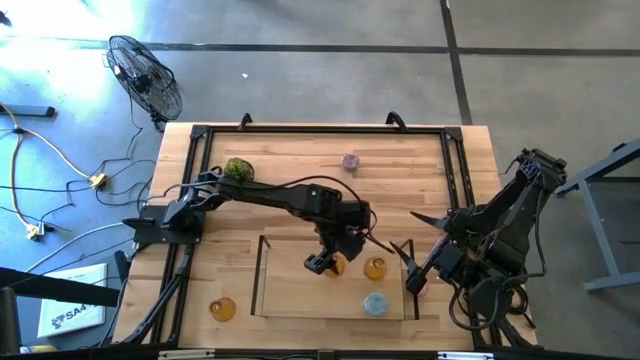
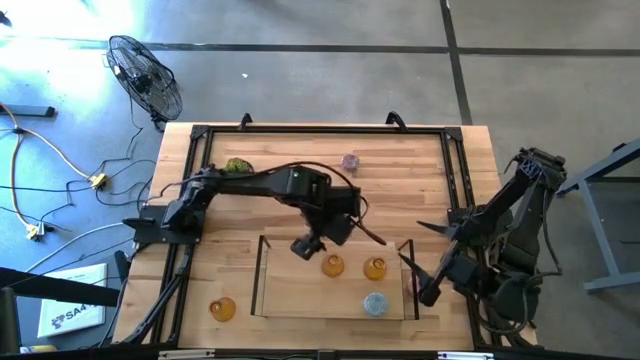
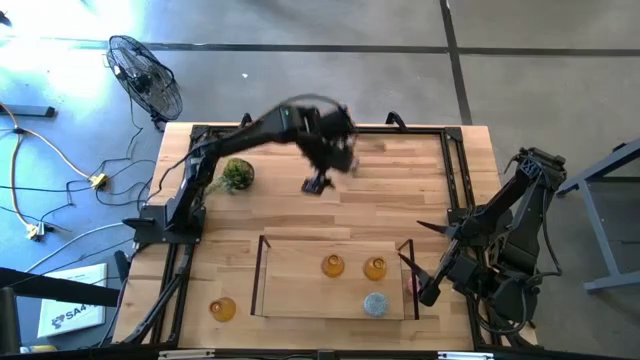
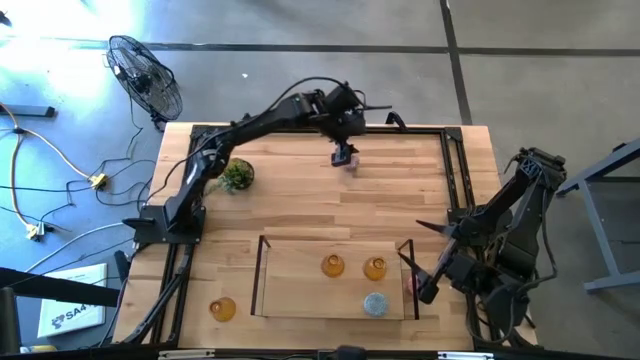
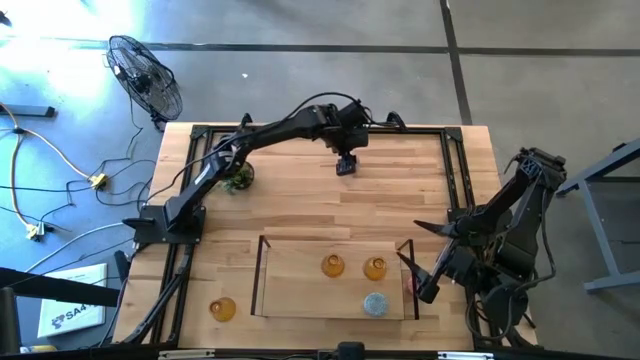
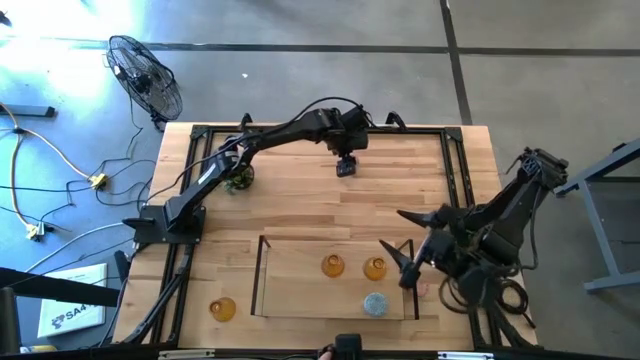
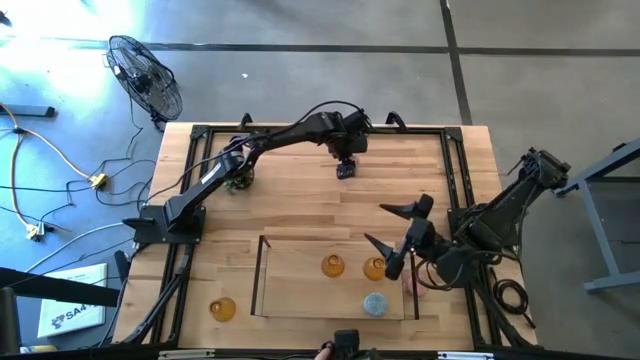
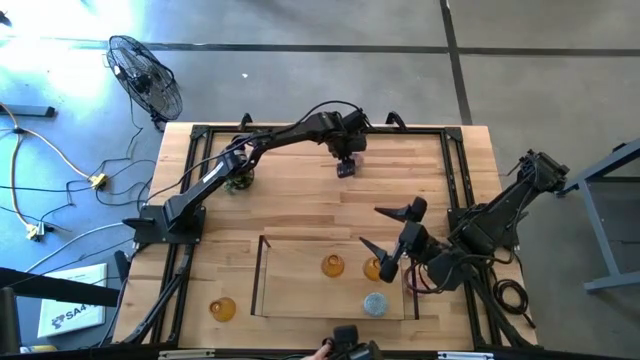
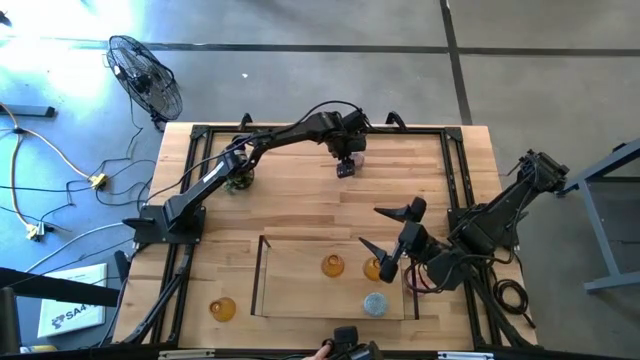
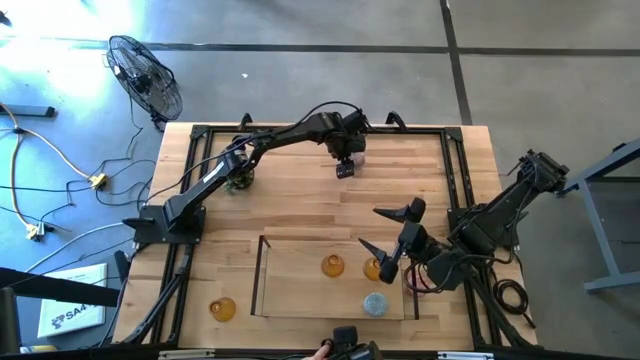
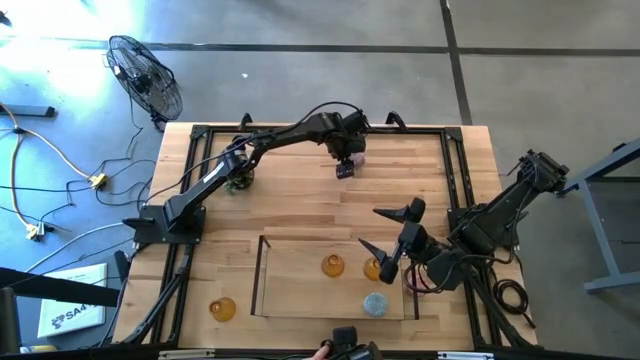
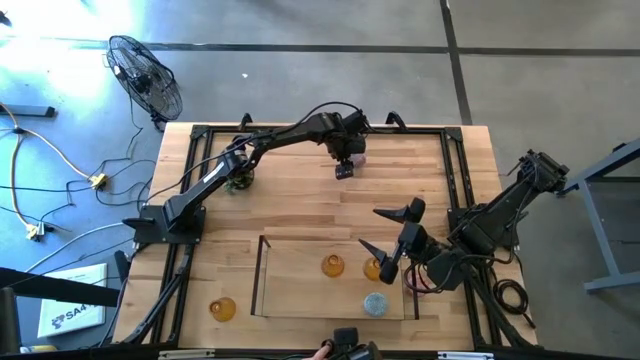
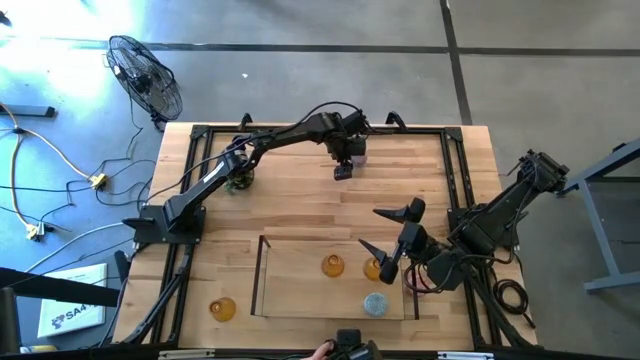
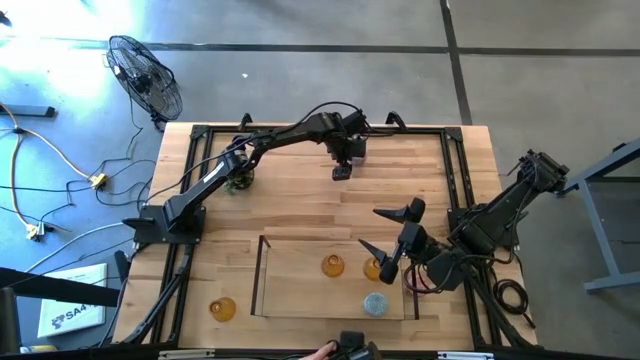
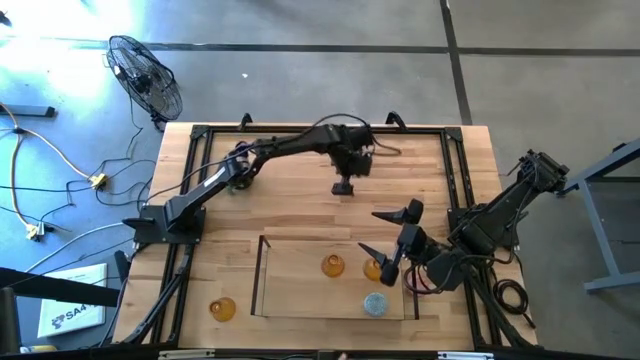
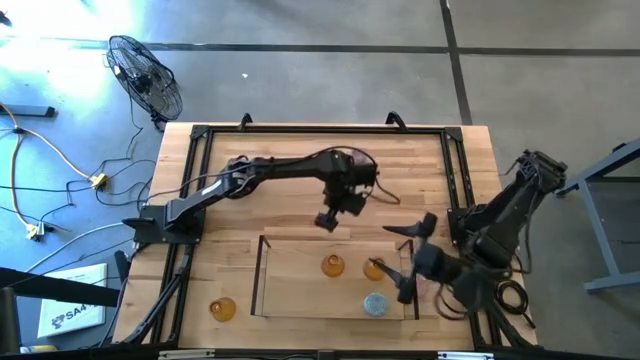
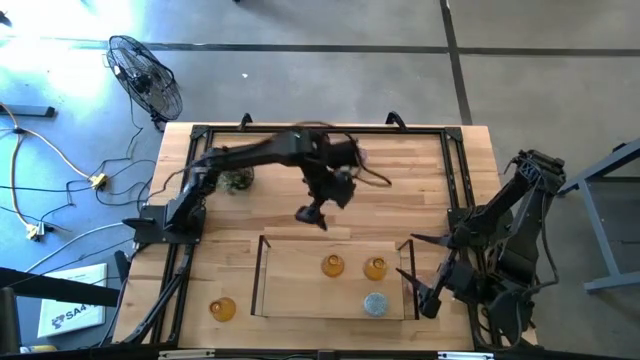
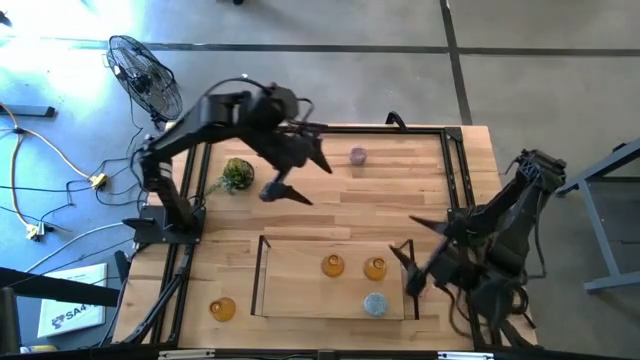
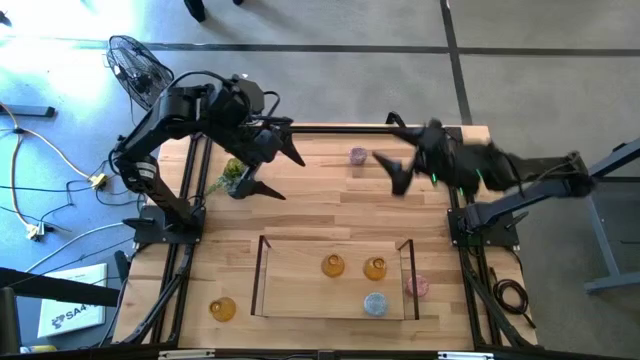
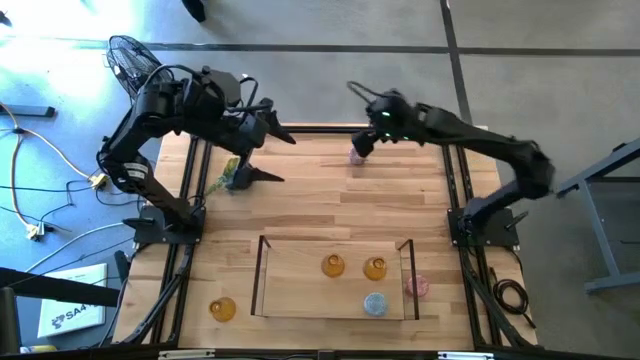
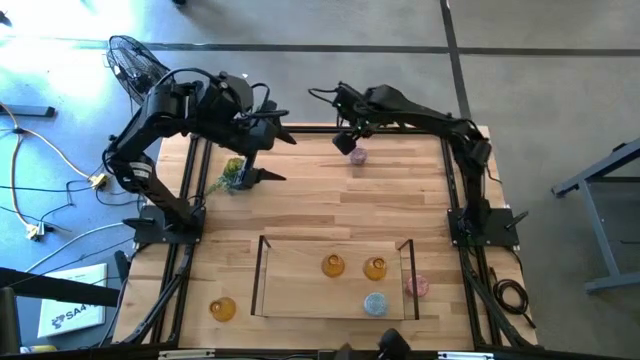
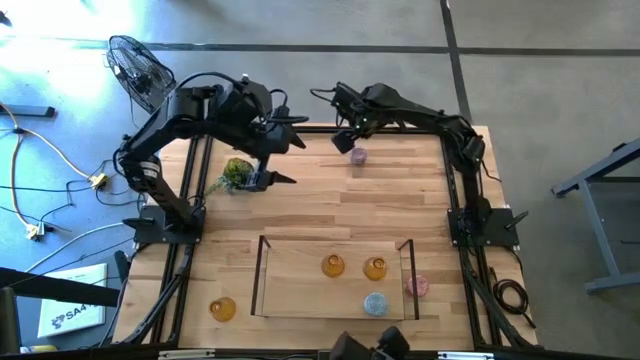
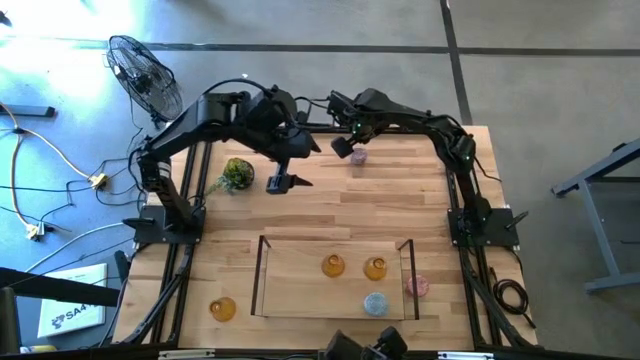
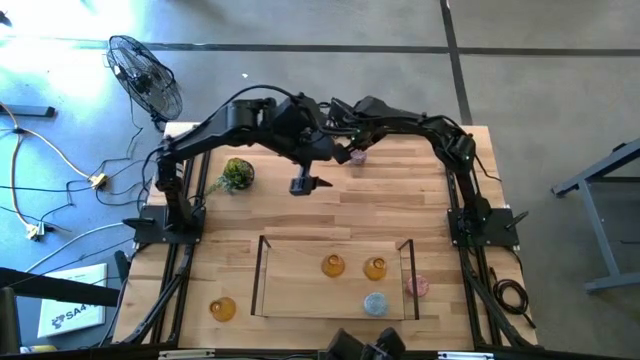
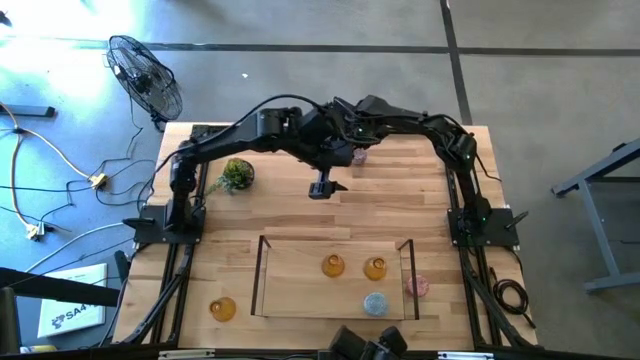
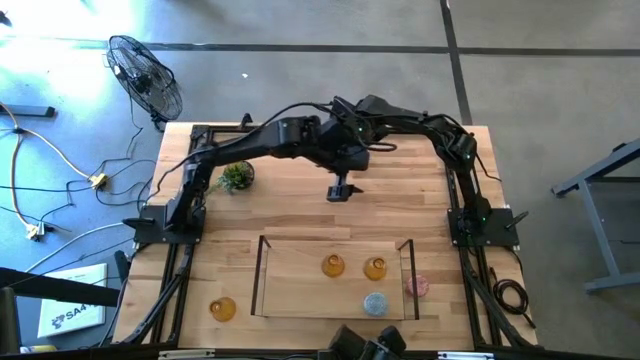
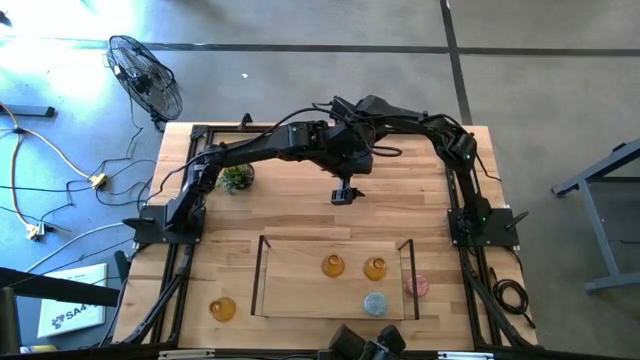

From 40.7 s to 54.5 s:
Task: Pick & Place candle stick holders
Put the red patterned scented candle on the shelf

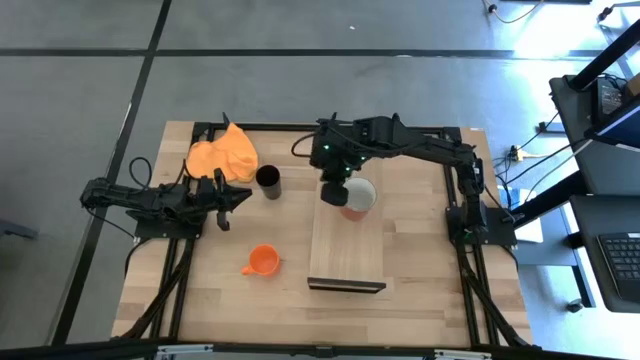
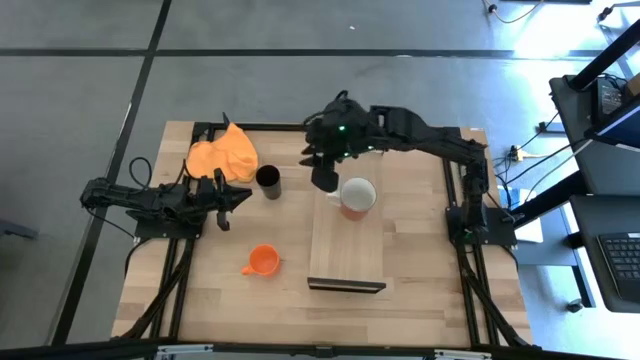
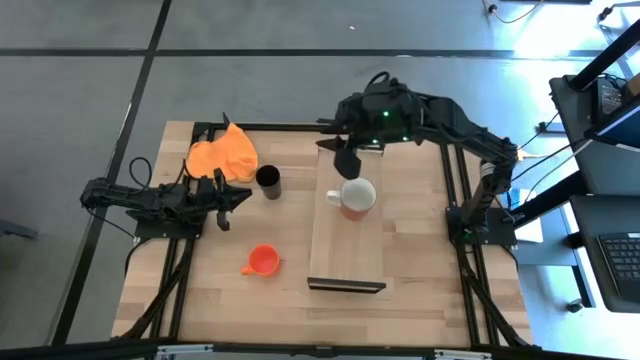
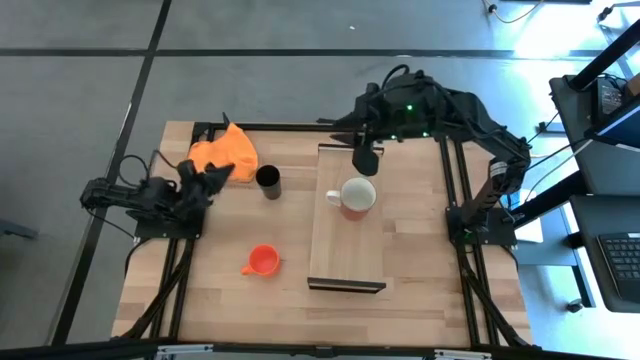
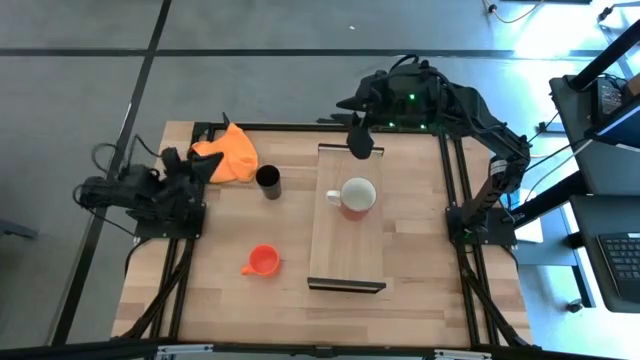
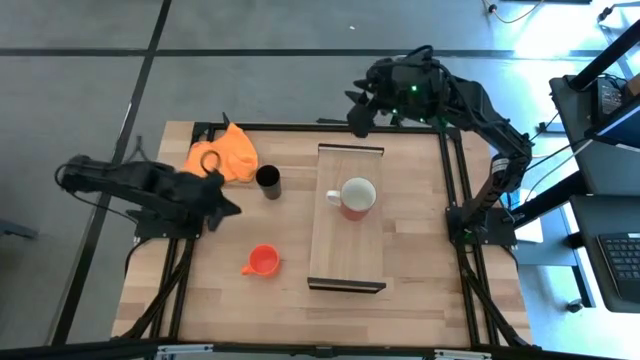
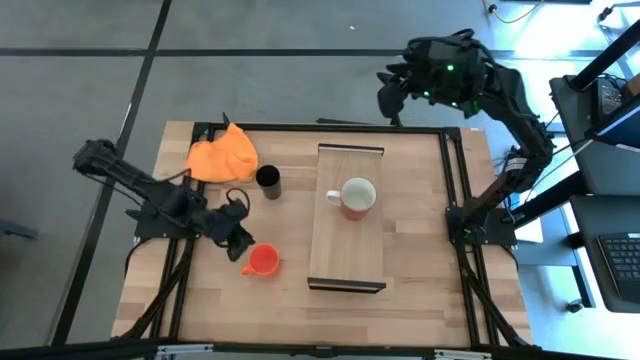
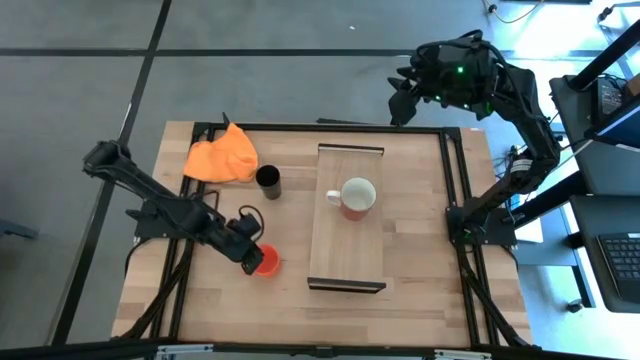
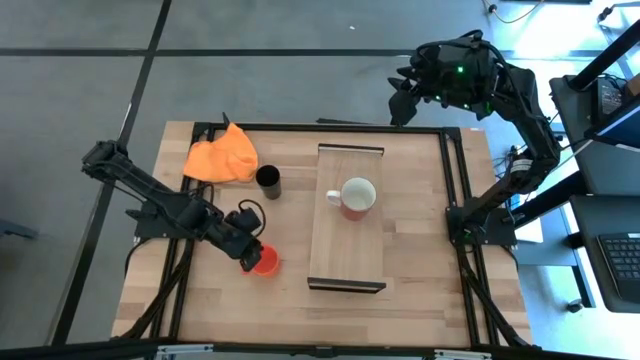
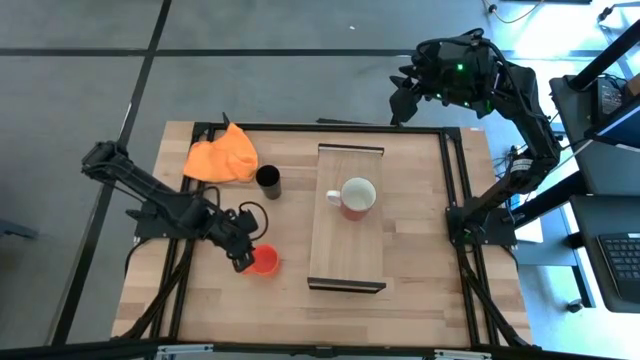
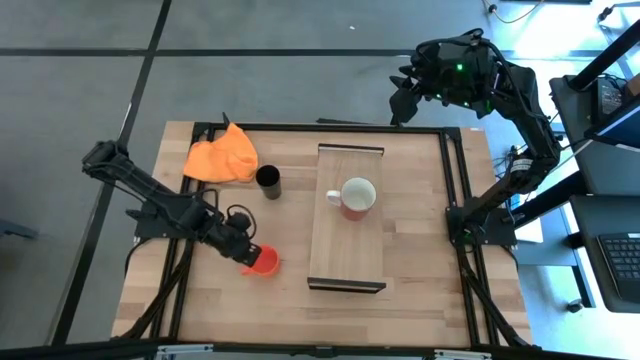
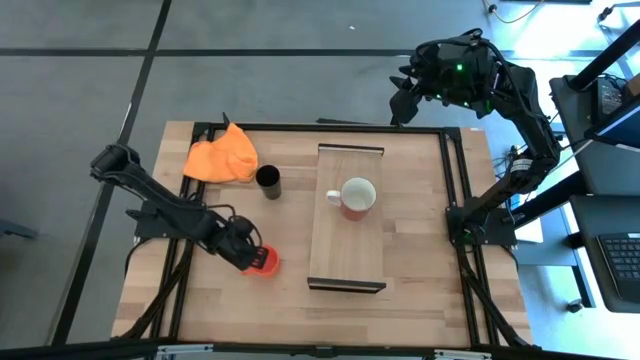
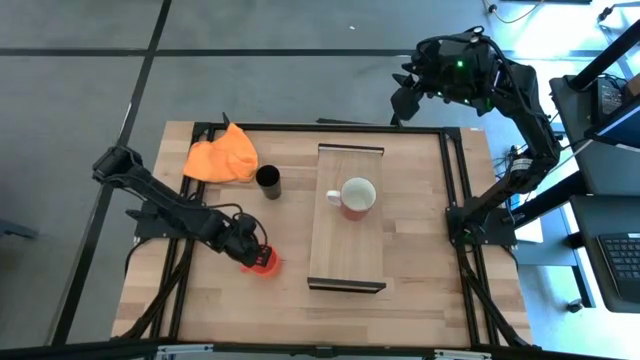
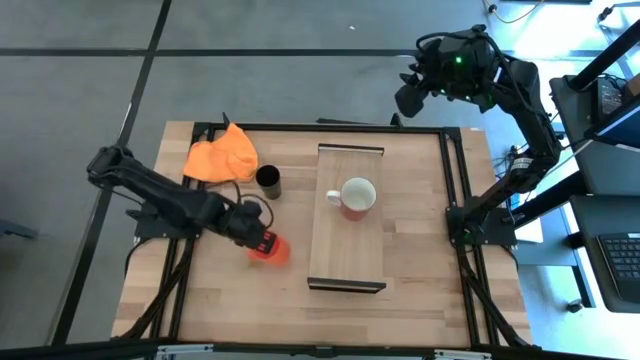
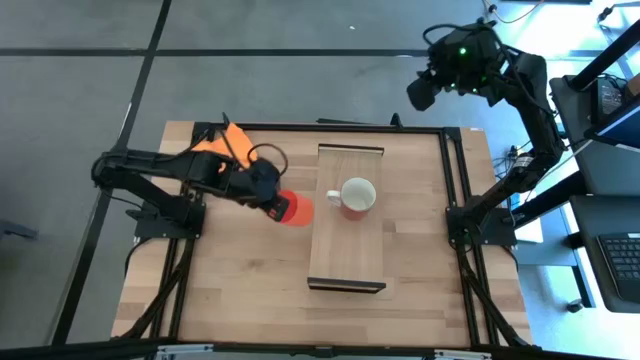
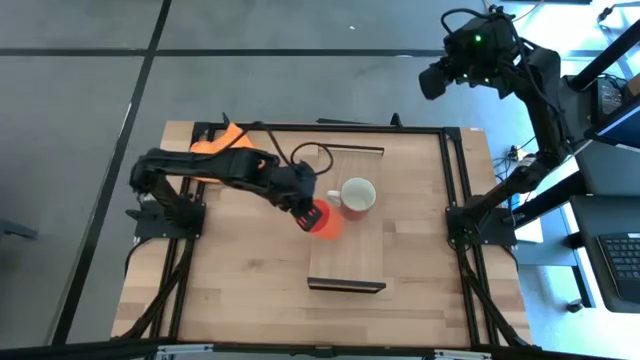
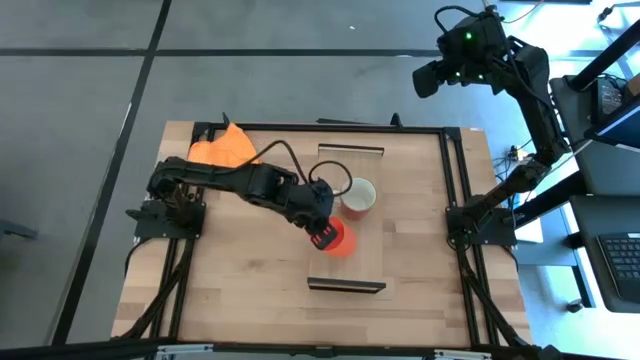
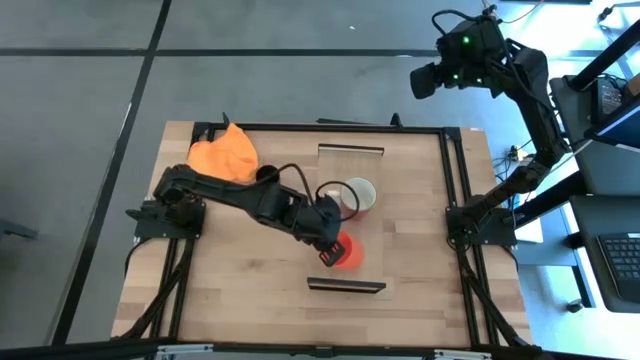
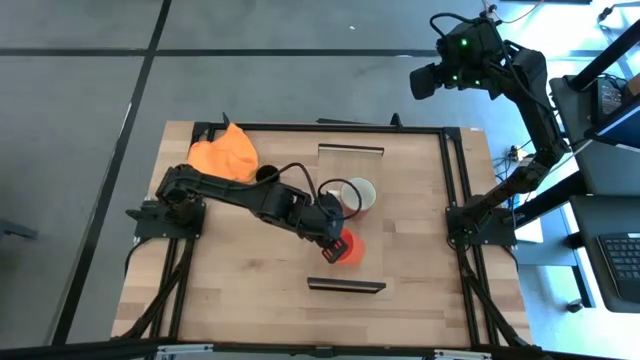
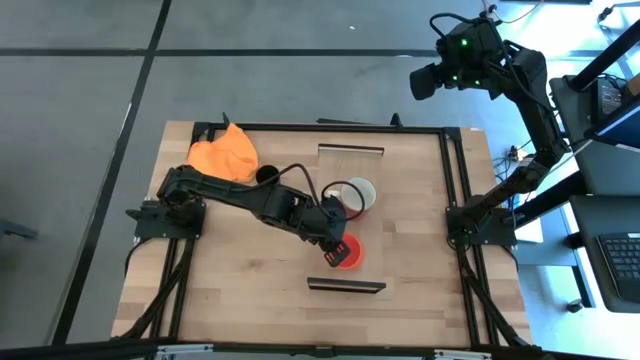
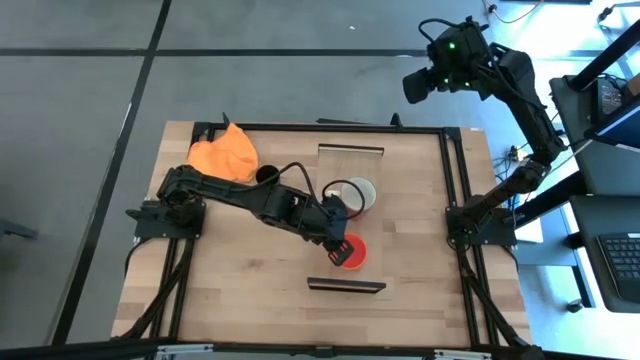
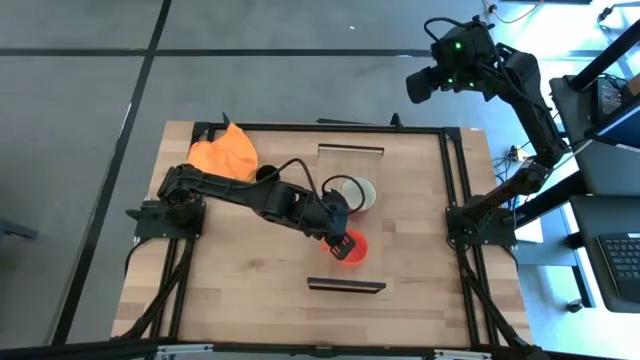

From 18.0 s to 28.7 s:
Task: Stack small to large cups/mugs on shelf
Put the orange mug on the shelf
